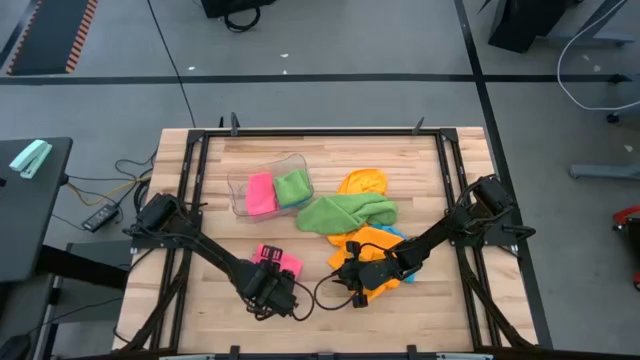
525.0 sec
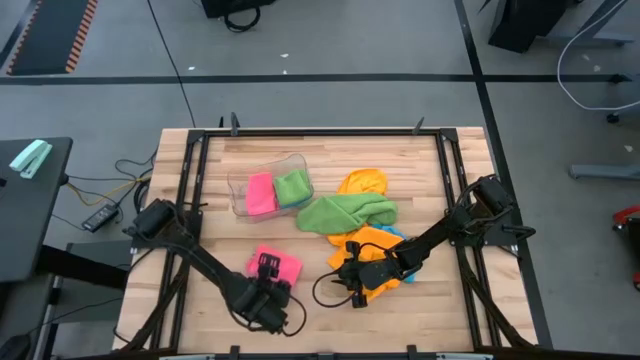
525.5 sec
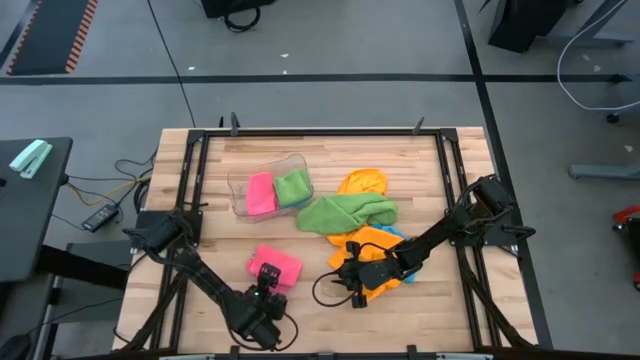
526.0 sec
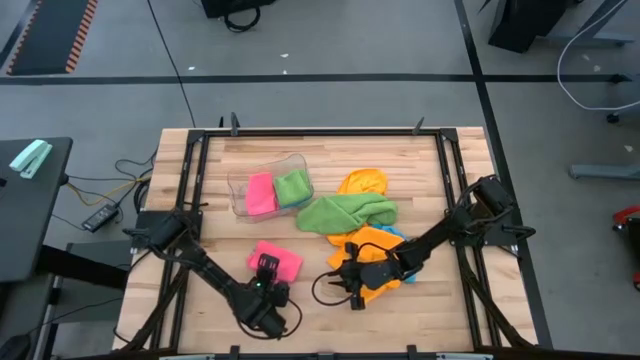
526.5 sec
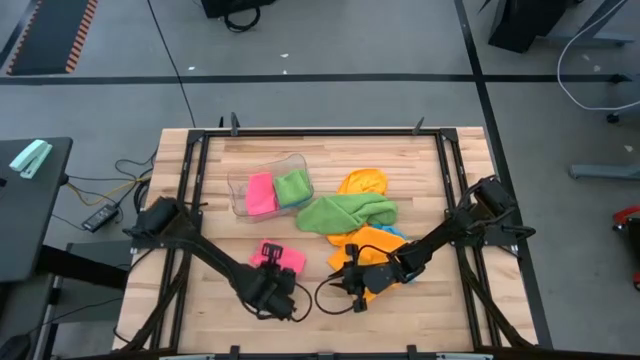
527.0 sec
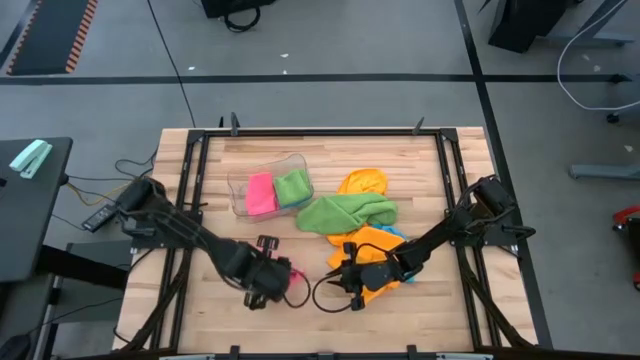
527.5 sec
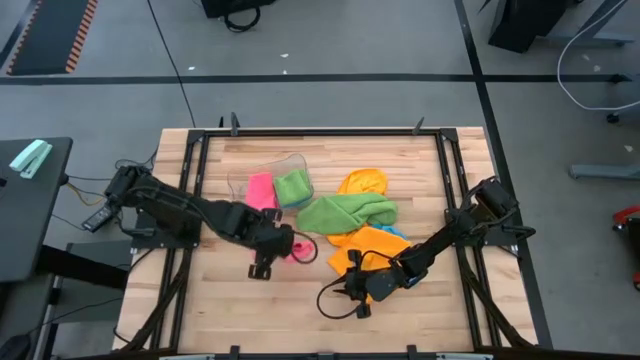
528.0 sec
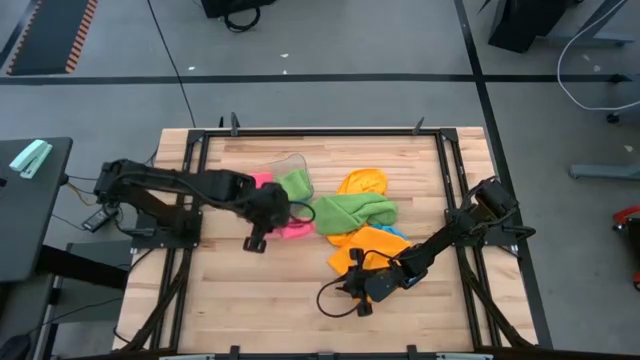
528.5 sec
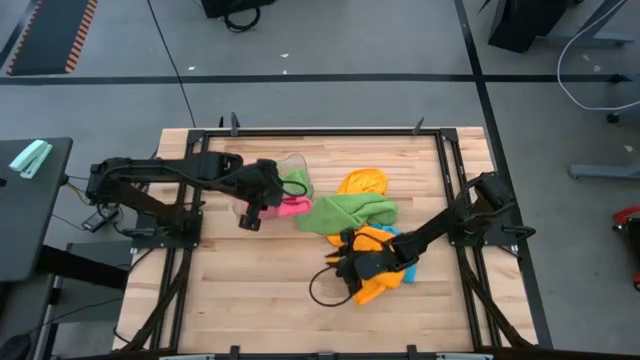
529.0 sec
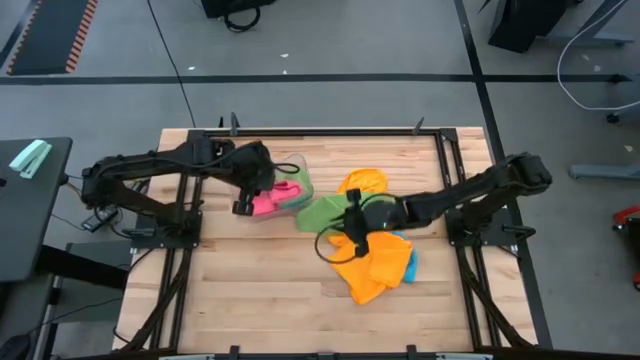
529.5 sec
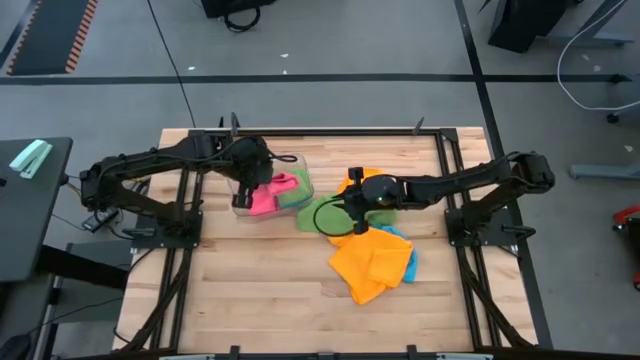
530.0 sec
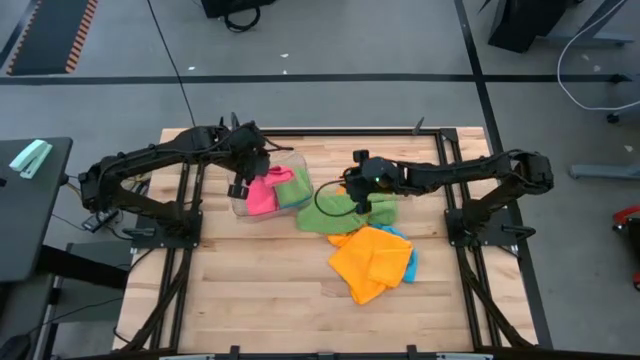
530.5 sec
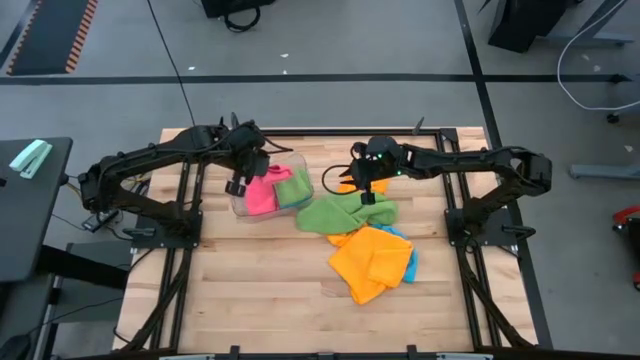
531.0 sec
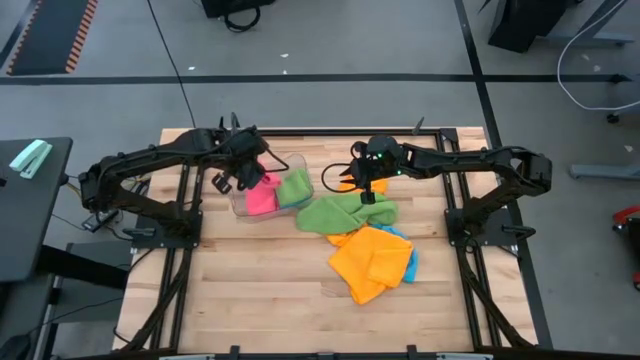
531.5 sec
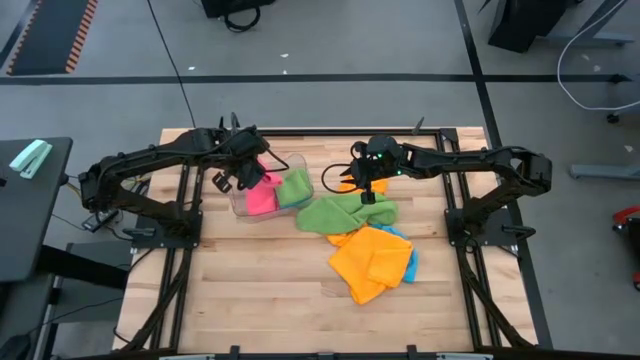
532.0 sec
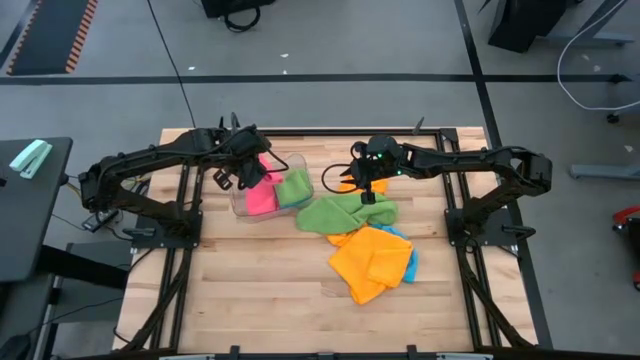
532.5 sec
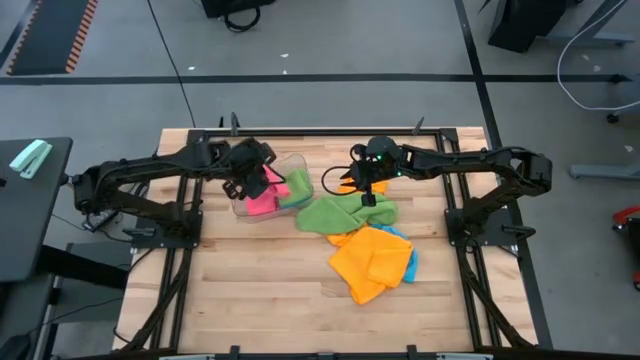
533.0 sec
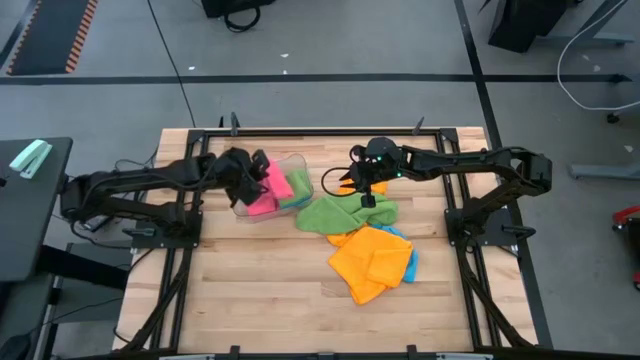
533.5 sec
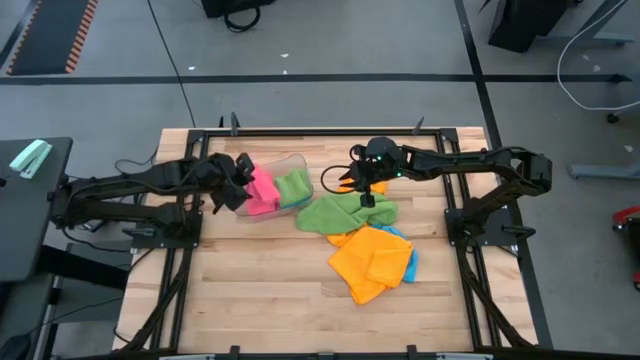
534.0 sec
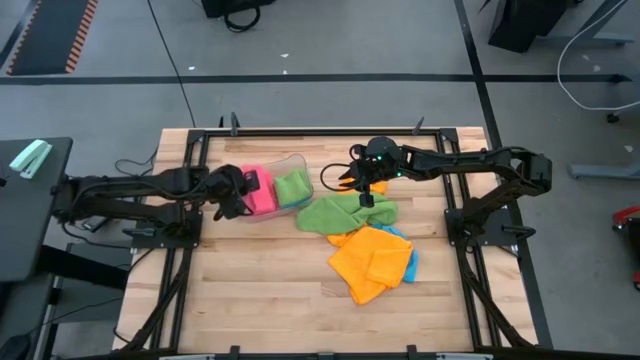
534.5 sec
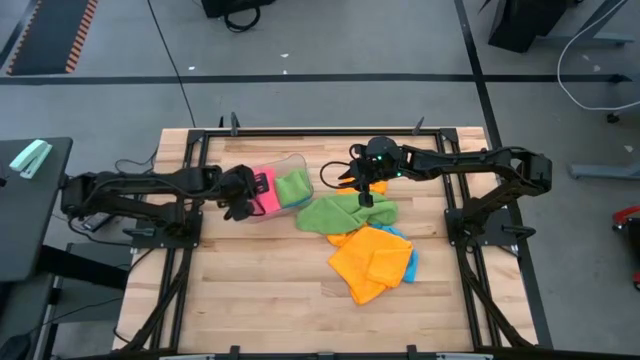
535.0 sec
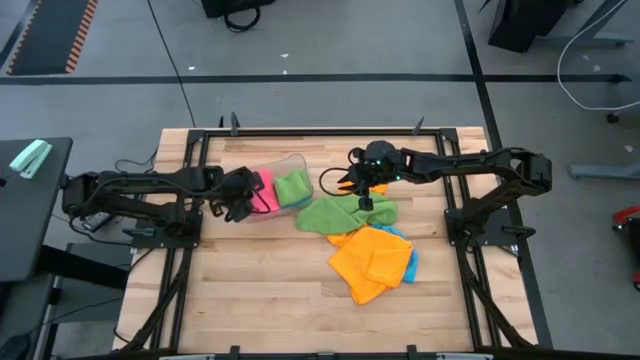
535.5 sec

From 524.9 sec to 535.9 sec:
Task: Fold microfiber towels
Put the pink microfiber towel into the transparent bin

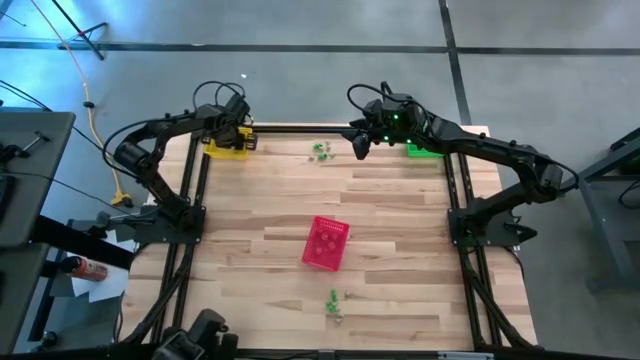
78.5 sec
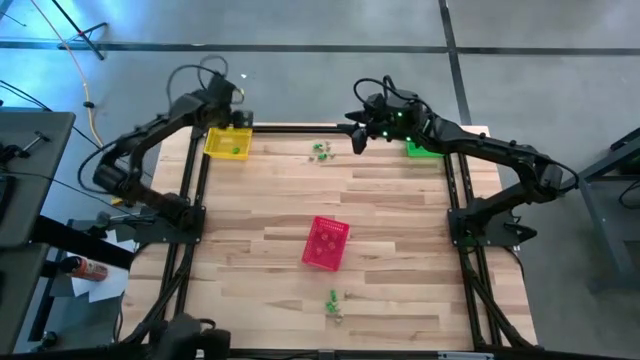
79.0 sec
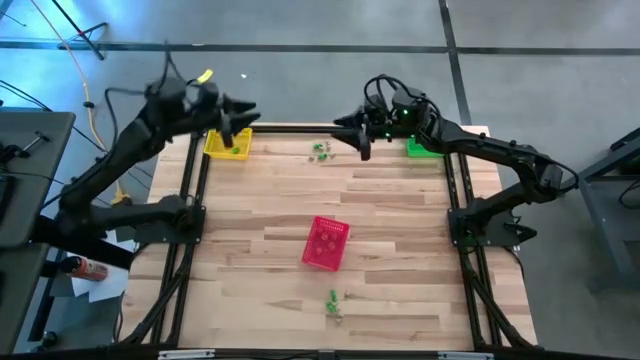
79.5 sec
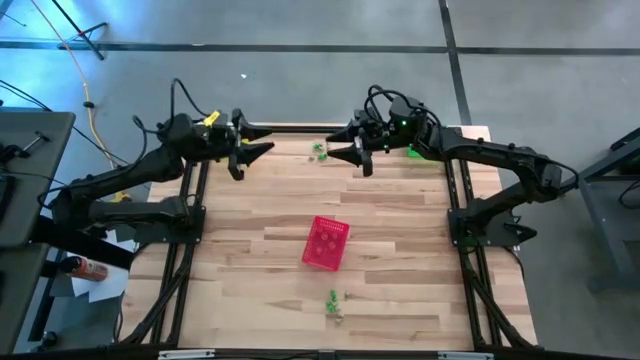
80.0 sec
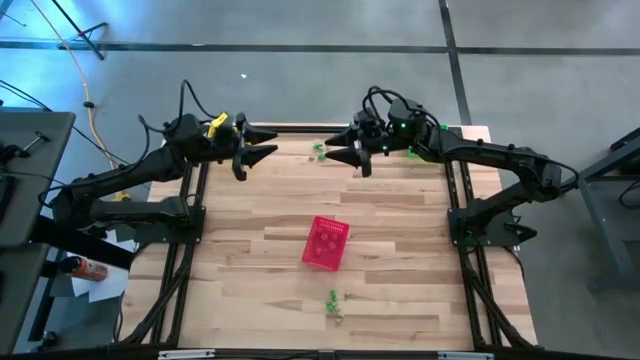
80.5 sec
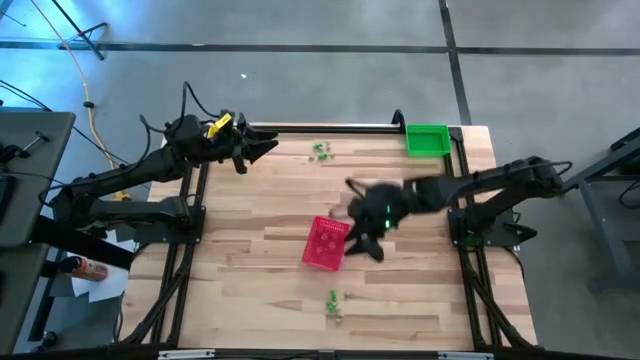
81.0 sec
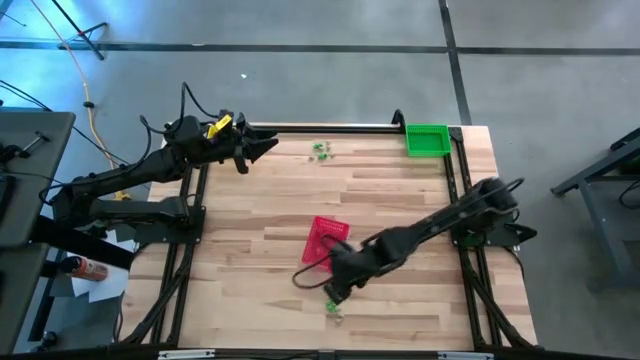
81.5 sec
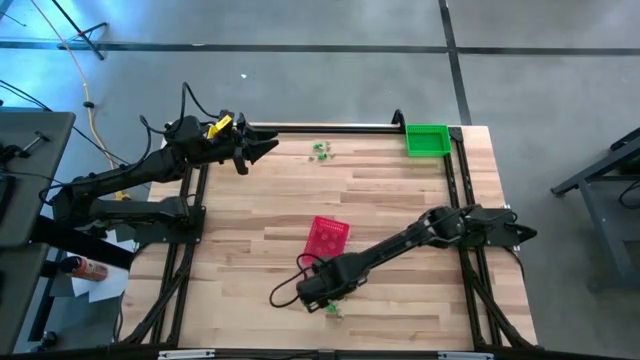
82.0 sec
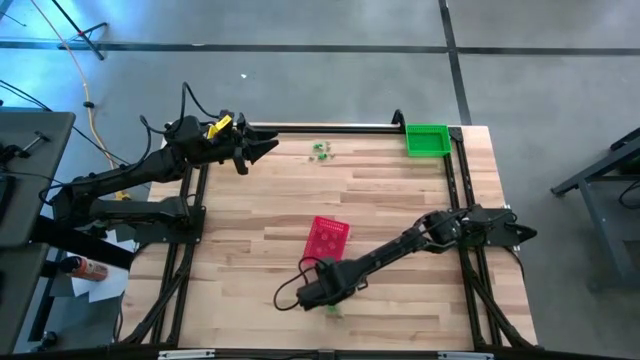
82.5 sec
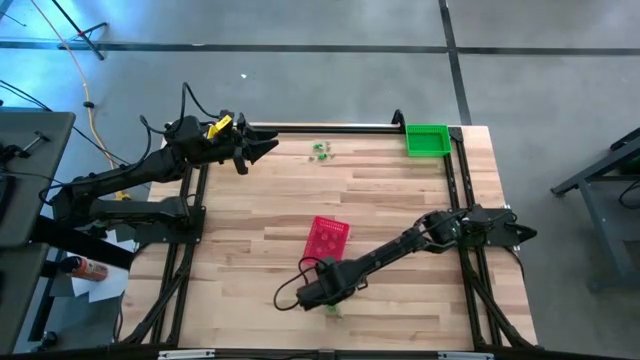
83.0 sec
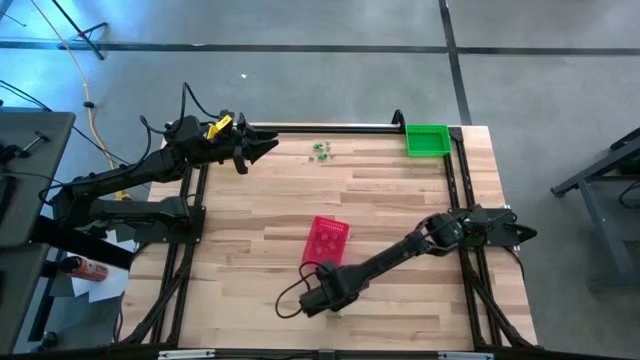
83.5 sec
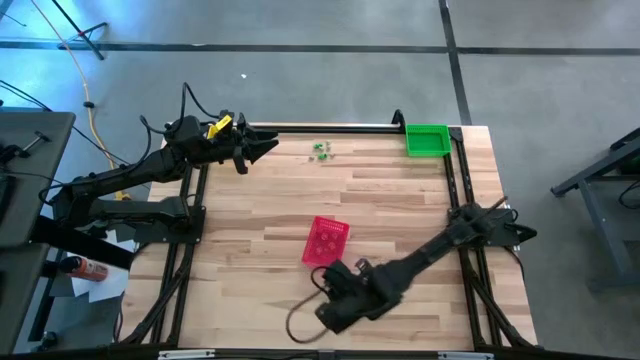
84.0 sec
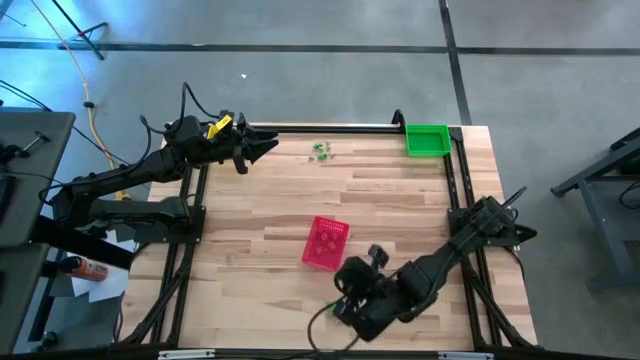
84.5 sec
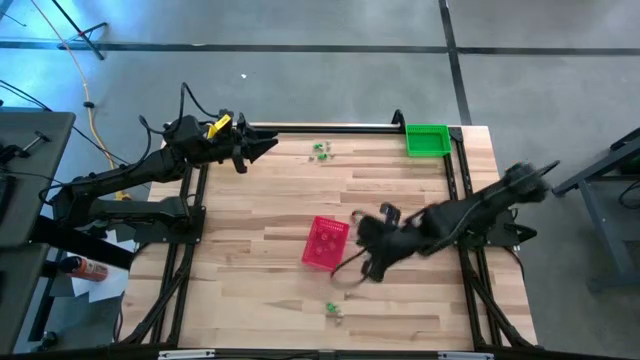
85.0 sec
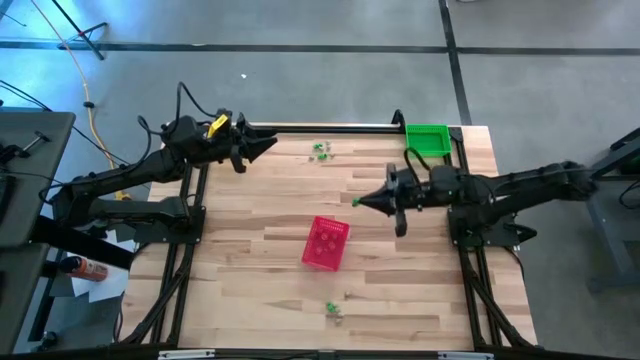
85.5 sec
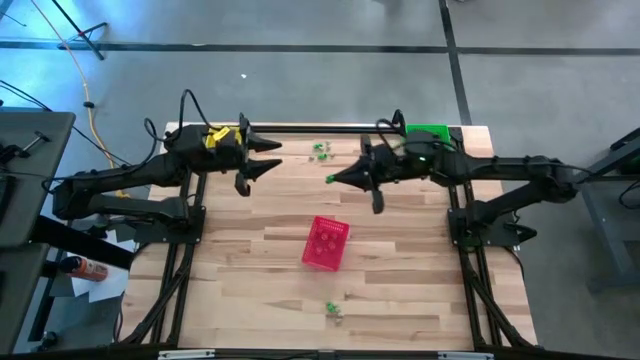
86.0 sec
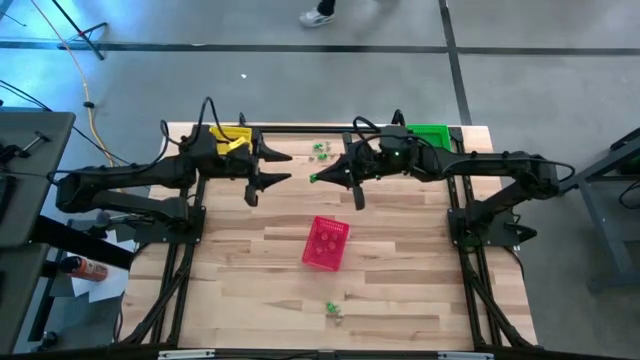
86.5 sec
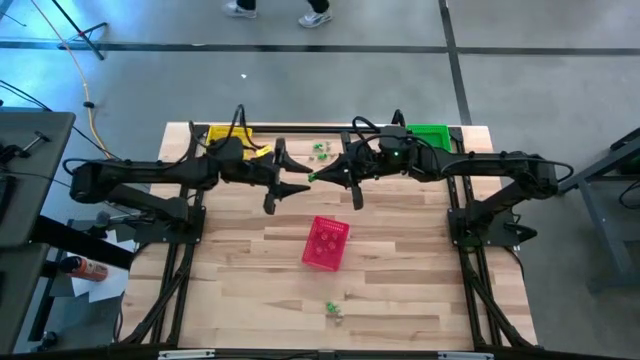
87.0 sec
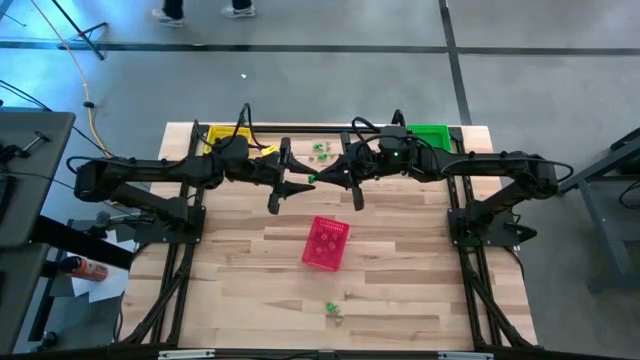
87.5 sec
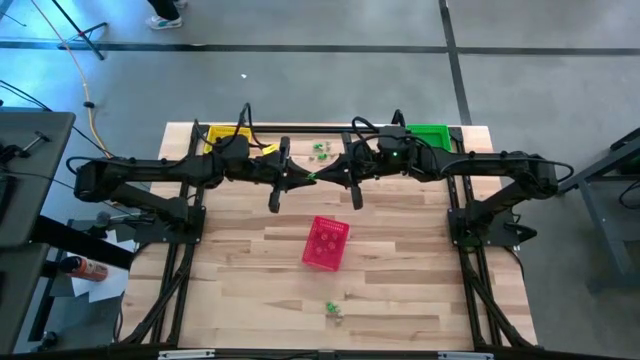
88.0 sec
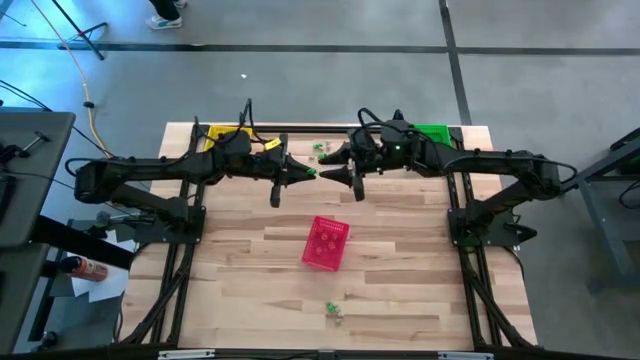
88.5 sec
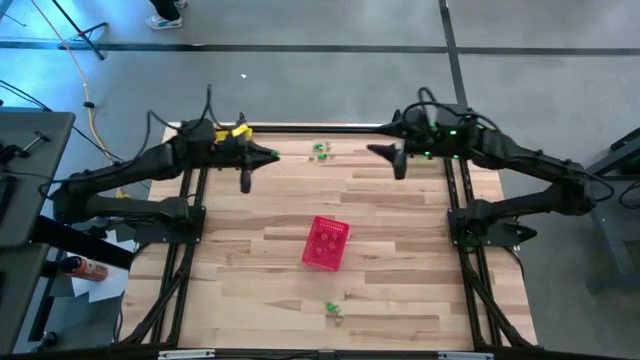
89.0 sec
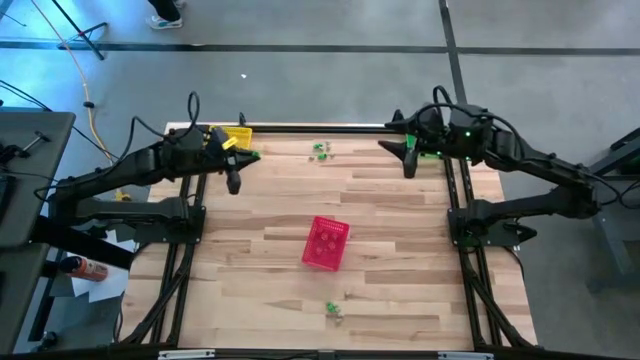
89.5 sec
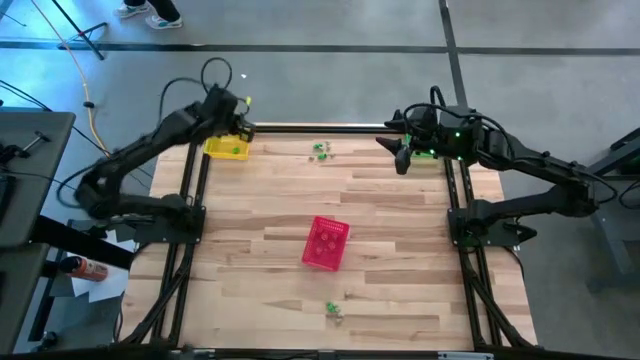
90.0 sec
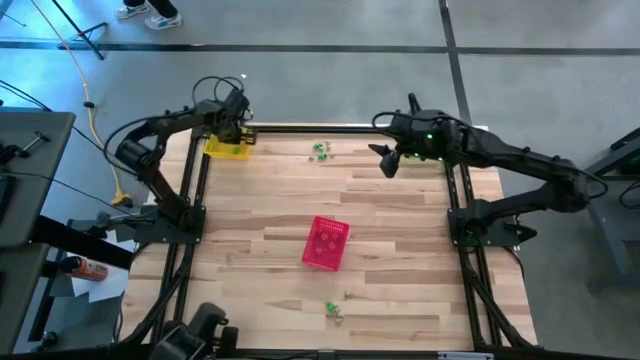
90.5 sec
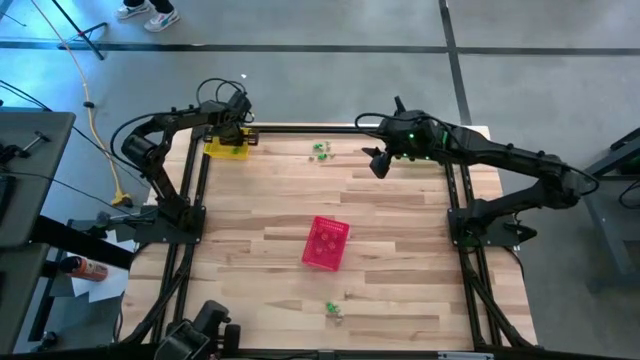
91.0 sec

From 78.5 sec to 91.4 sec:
Task: Sort Halloween decoration
Put the green skeleton toy into the yellow bin
